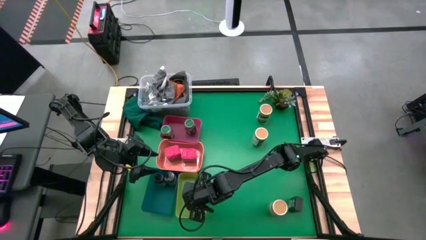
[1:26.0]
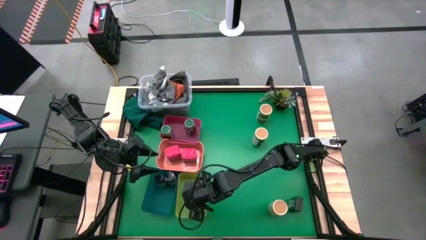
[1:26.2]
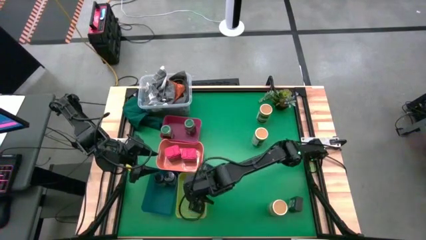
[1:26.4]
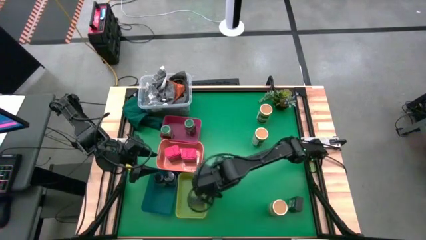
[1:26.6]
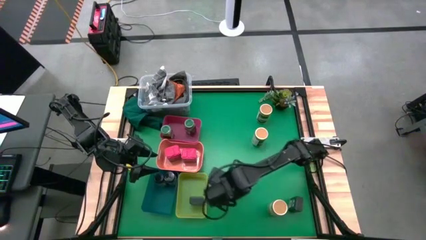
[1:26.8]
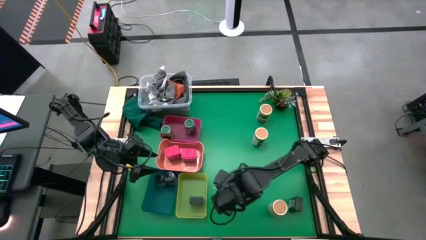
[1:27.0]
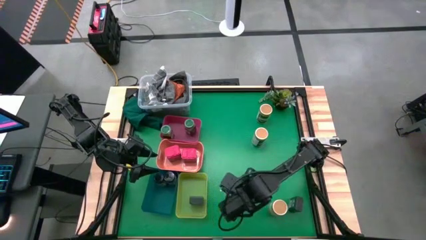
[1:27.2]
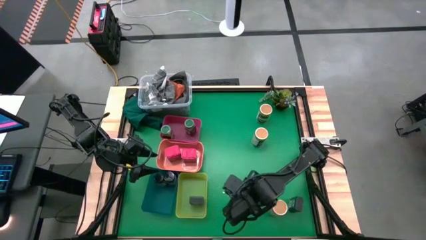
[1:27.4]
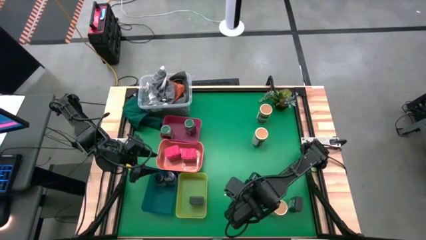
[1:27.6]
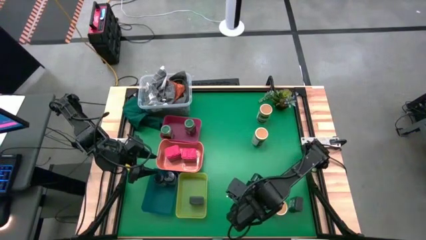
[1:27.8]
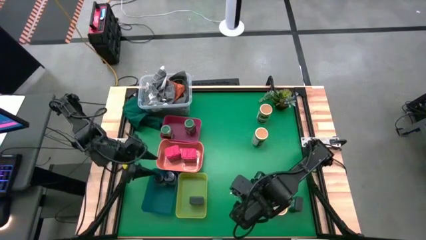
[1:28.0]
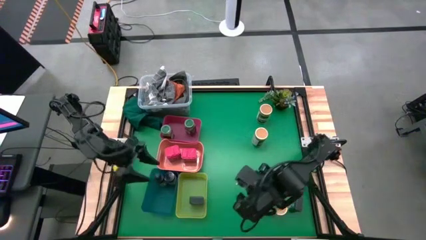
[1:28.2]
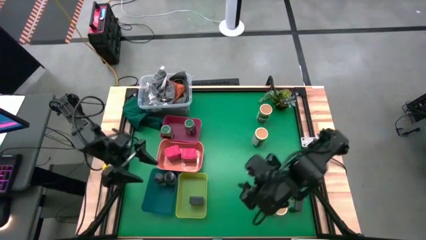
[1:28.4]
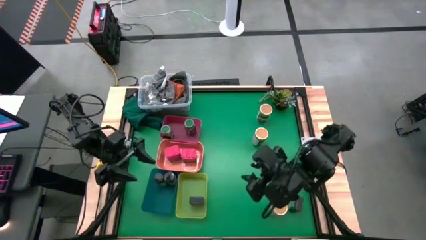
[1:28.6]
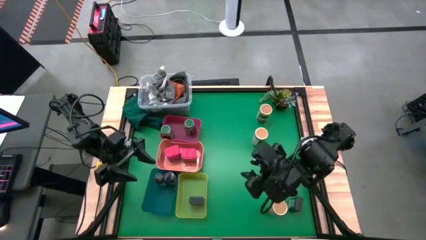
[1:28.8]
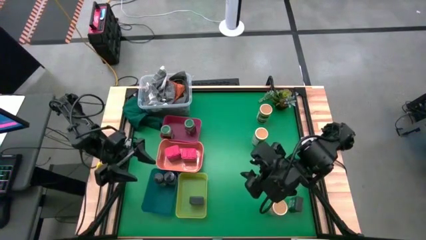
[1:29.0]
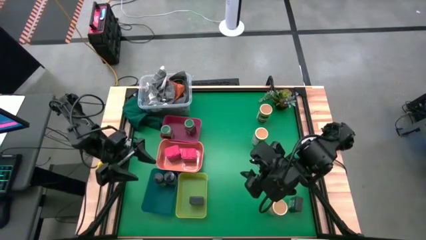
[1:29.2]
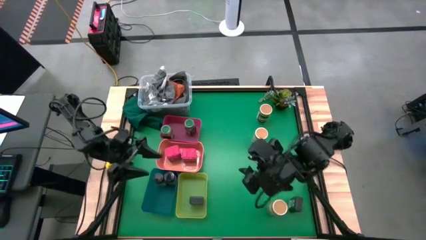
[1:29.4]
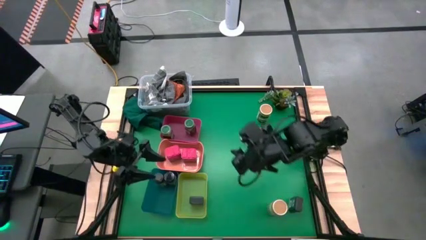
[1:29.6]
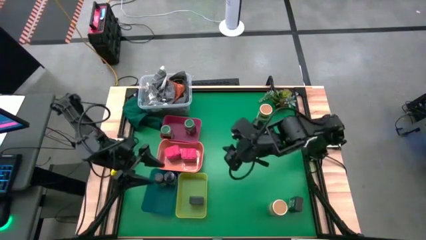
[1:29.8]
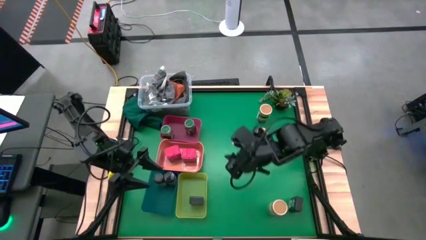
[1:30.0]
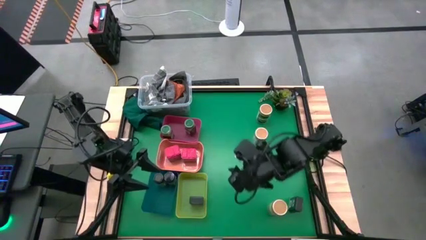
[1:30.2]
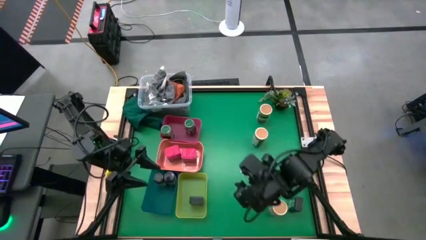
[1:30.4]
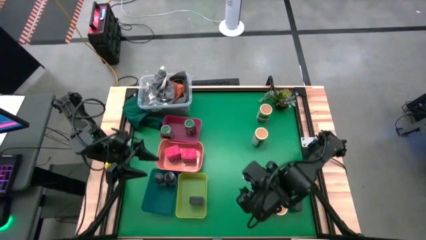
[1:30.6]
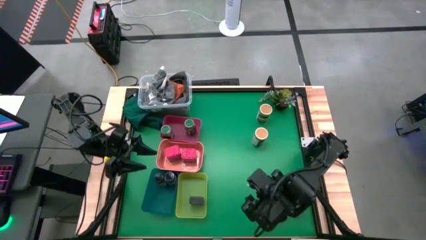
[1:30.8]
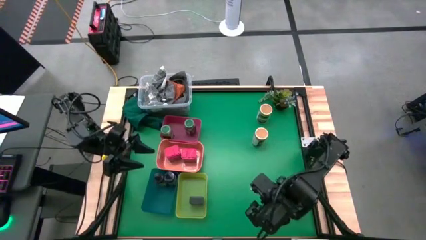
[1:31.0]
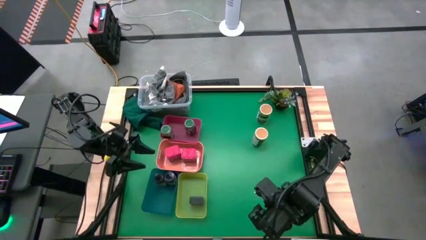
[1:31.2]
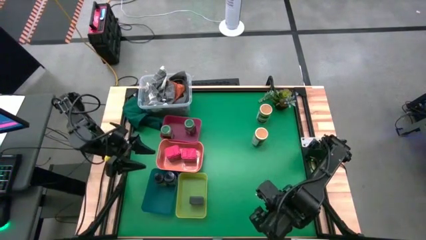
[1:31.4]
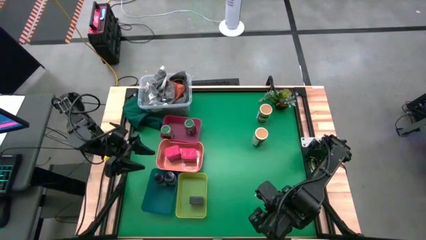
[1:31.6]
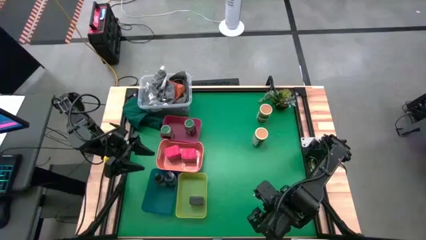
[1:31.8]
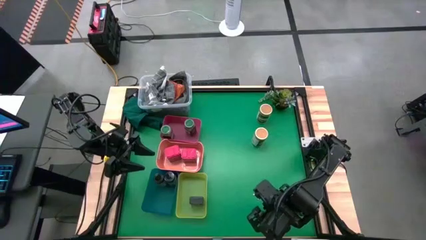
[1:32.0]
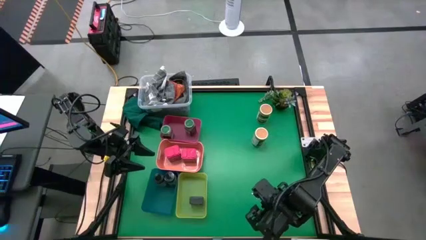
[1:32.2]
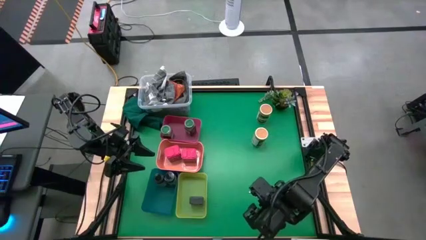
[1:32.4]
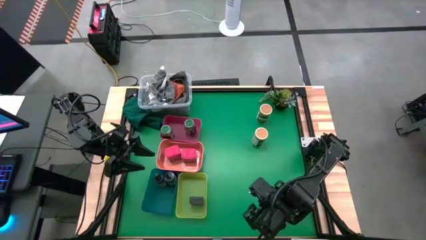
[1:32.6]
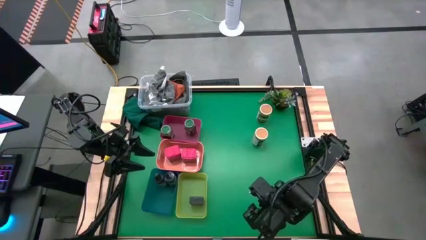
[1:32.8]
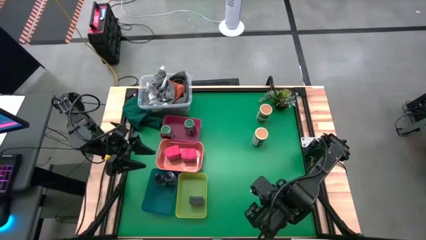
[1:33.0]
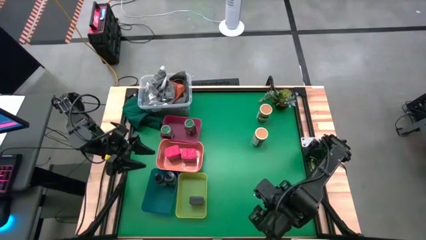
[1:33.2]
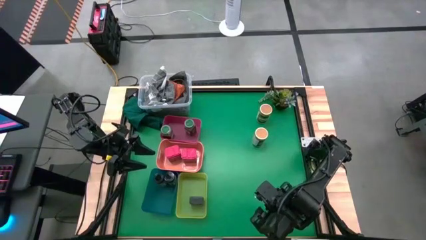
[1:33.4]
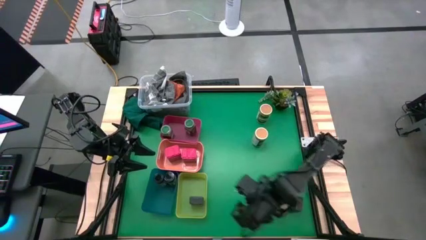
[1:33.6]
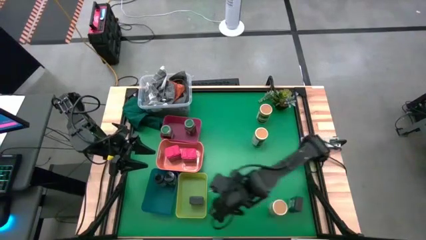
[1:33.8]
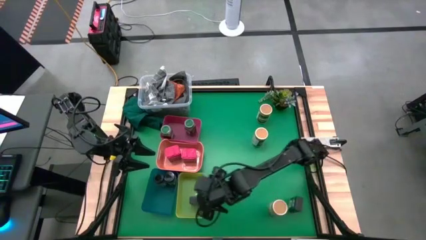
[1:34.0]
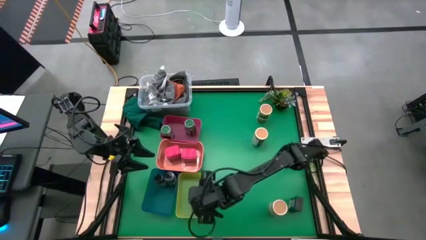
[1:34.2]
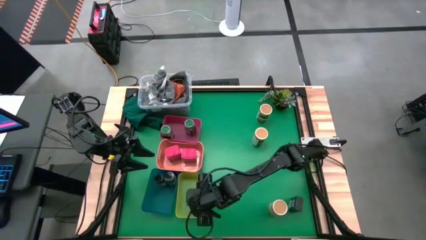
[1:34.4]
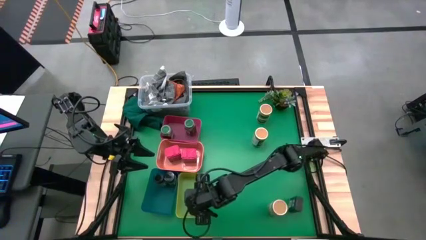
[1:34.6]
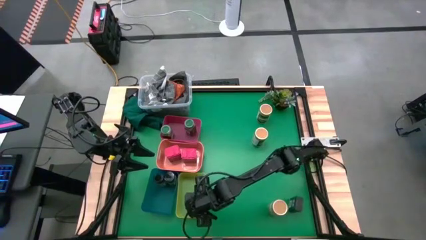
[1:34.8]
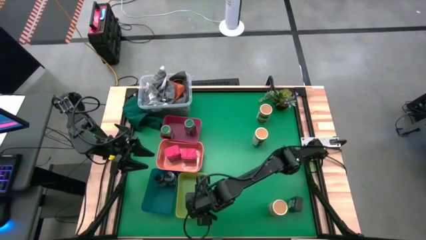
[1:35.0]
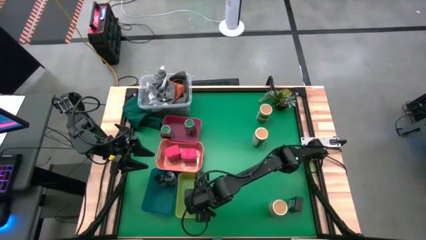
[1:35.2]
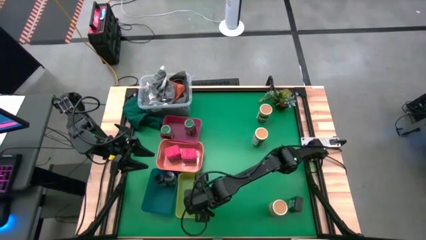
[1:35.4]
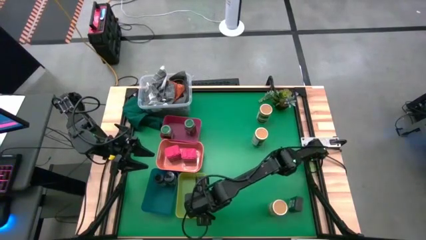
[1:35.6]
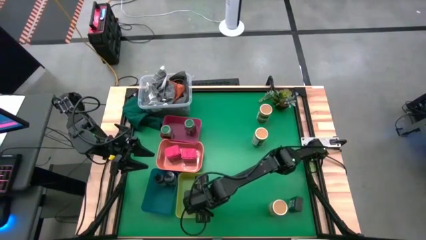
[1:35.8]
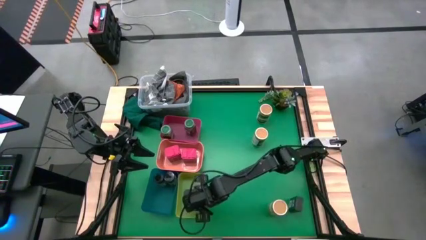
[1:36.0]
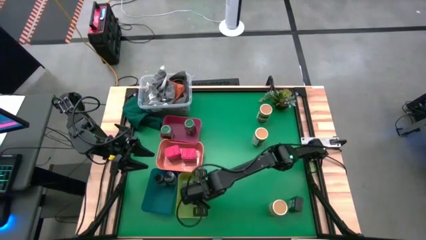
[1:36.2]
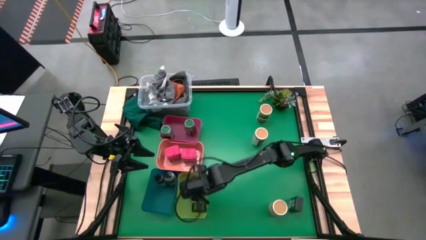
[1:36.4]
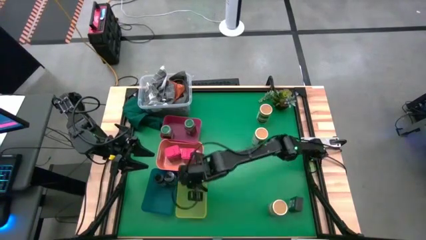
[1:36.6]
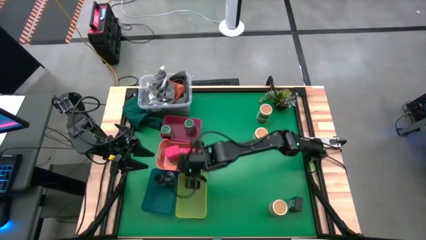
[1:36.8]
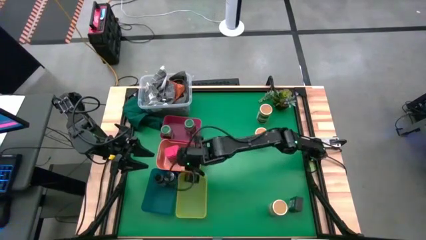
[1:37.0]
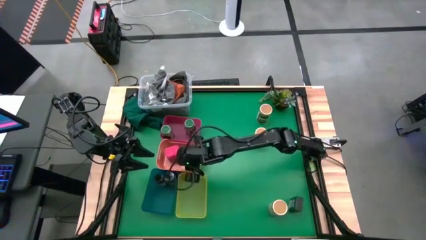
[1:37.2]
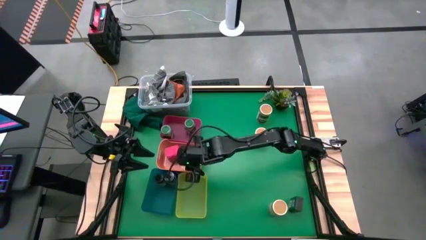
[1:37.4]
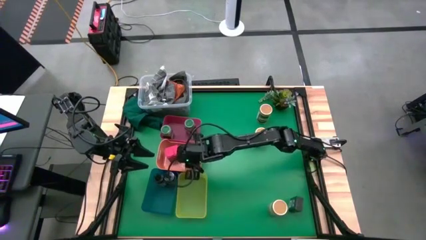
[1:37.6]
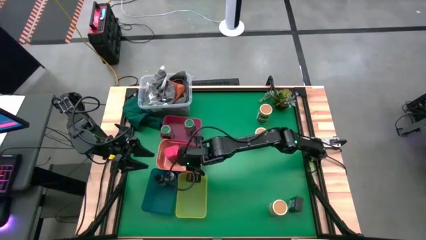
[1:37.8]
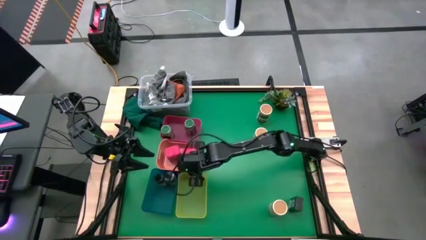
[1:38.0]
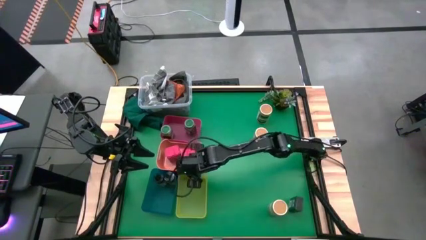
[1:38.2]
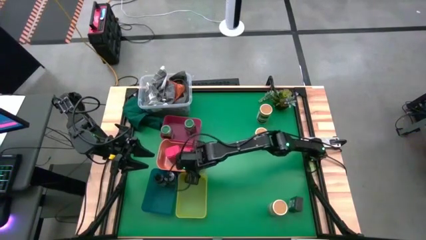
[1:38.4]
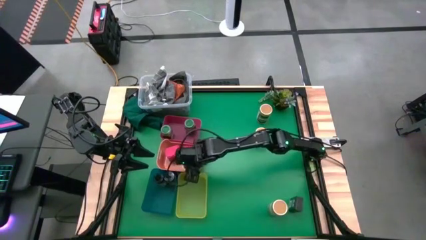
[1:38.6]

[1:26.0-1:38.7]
Task: Sort spices by type
Put the top black seasoning can into the orange bin

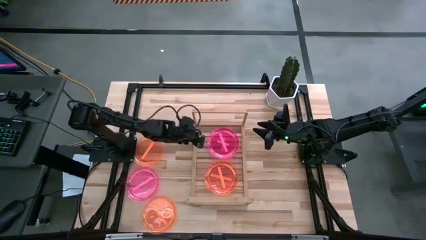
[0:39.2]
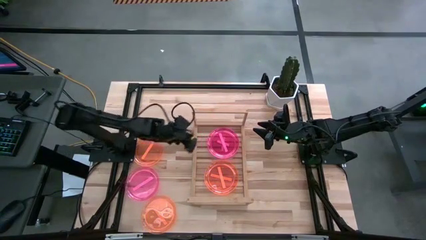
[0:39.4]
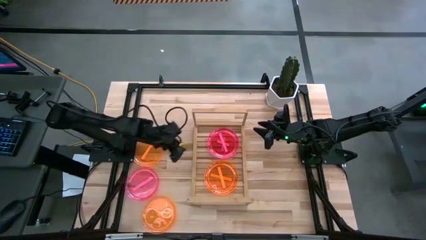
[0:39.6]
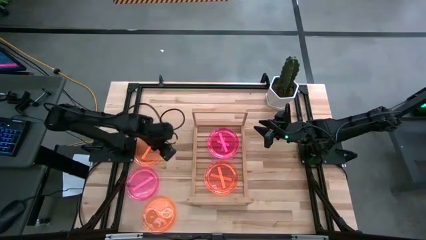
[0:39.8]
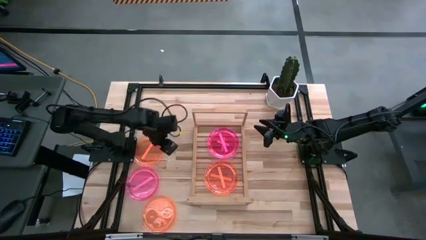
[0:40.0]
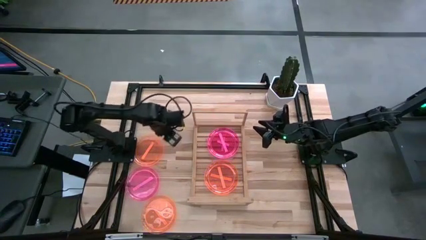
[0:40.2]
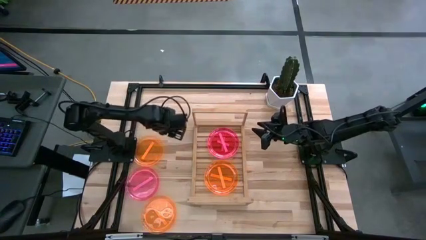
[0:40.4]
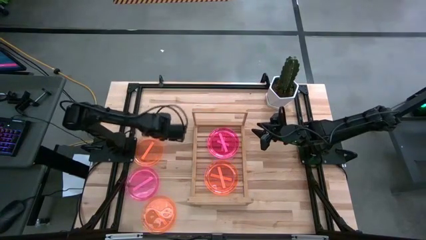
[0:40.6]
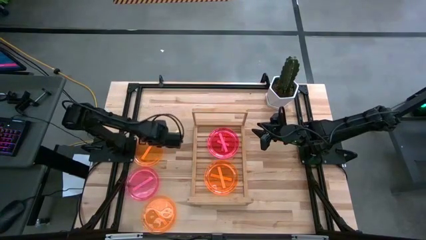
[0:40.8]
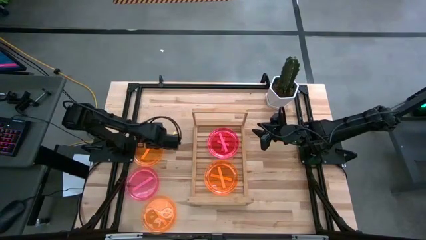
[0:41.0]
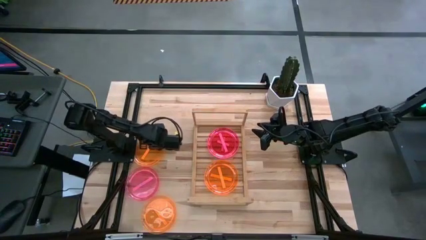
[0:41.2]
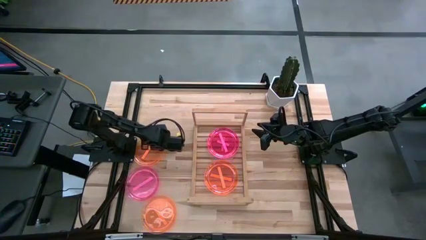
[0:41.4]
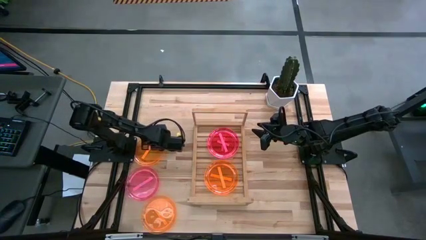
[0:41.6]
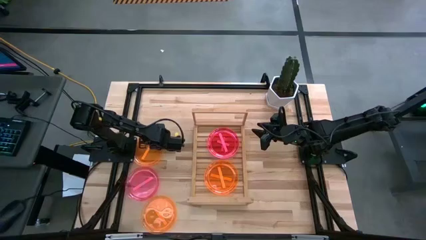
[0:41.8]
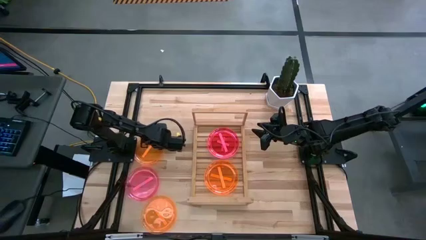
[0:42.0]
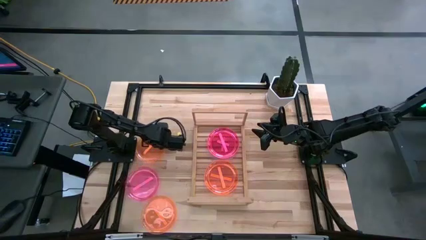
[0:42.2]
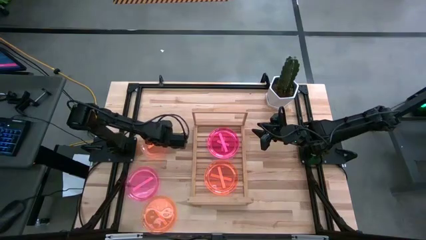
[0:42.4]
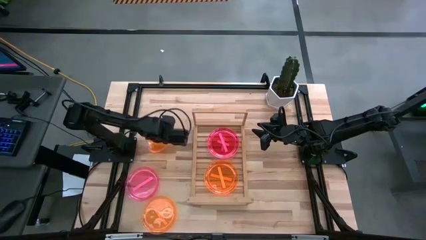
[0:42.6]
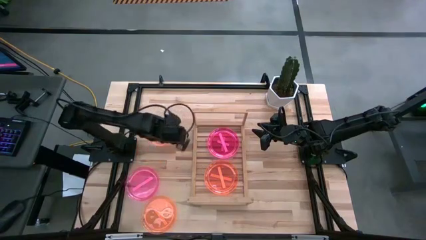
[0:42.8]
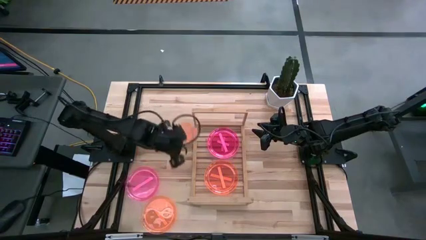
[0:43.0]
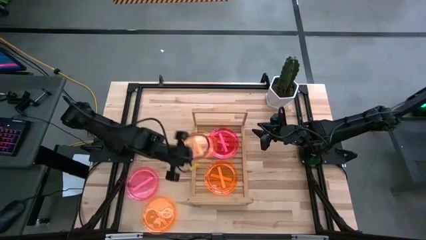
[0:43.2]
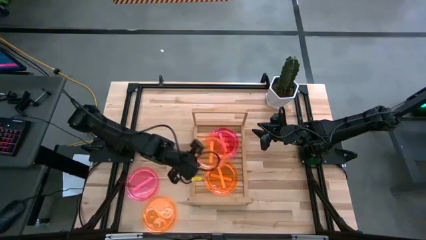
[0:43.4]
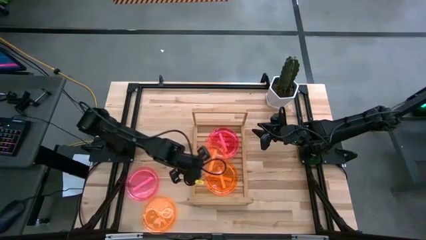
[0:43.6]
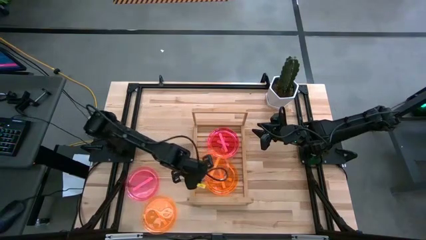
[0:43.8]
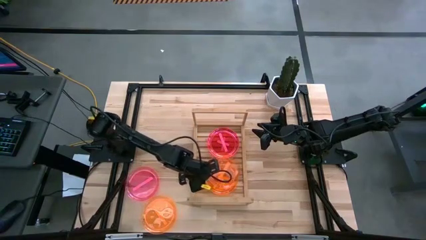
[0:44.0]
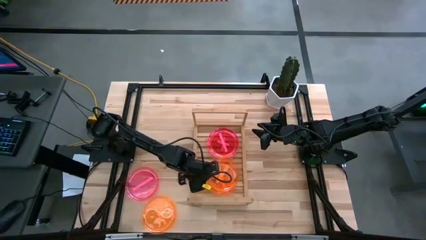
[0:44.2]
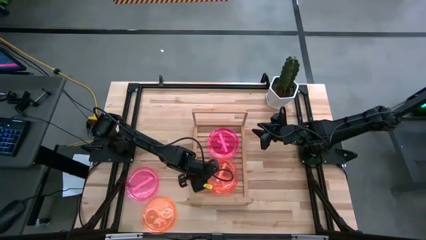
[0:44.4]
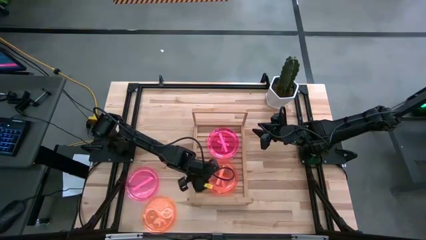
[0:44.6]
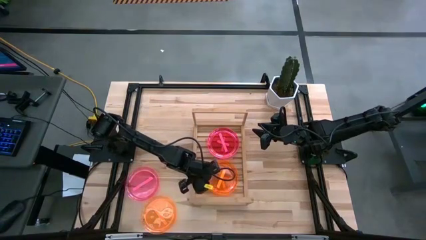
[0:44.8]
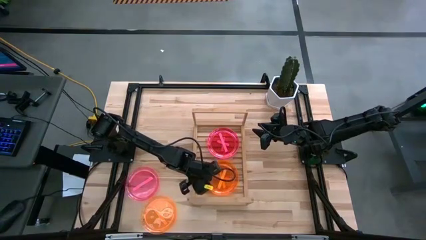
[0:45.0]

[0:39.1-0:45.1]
Task: Place and stack plates onto a shelf
Stack the orange plate on top of the orange plate on the shelf
